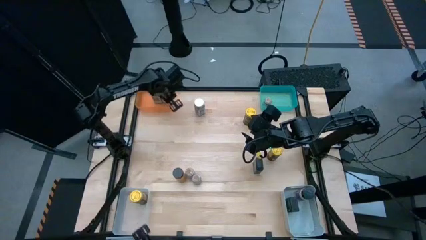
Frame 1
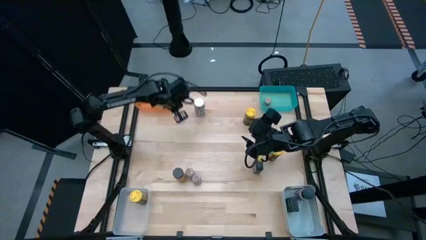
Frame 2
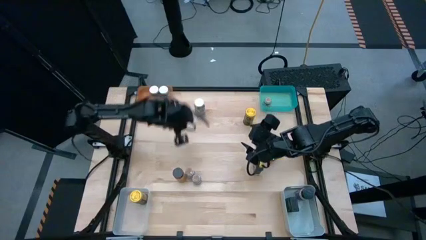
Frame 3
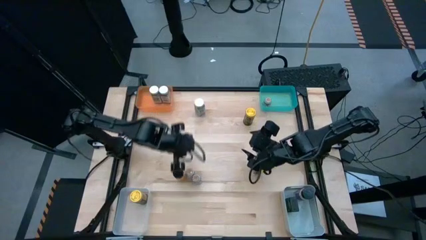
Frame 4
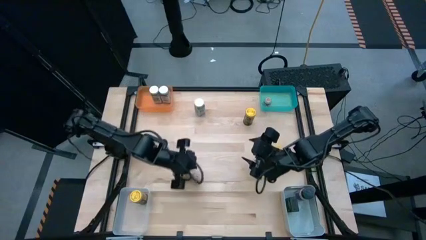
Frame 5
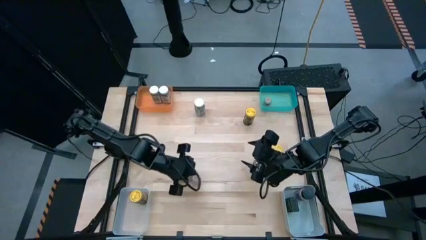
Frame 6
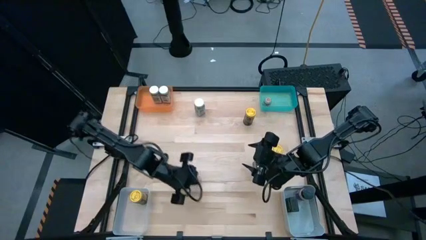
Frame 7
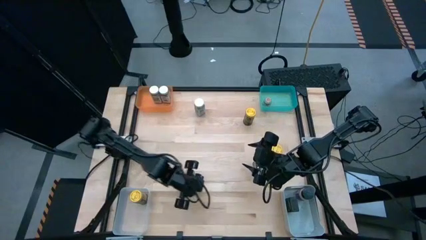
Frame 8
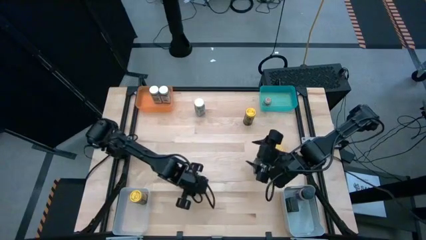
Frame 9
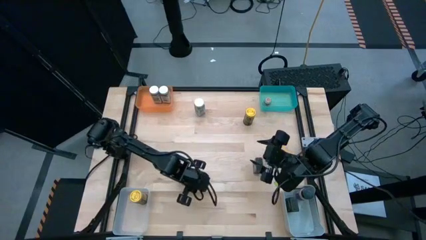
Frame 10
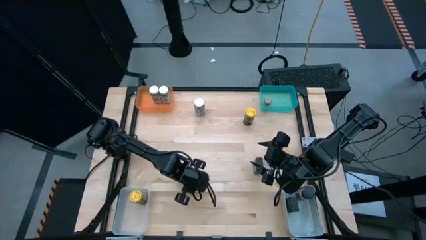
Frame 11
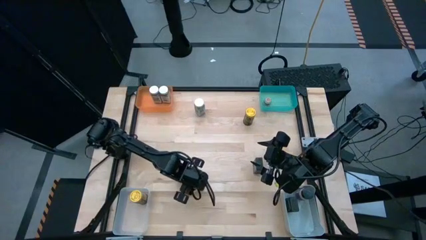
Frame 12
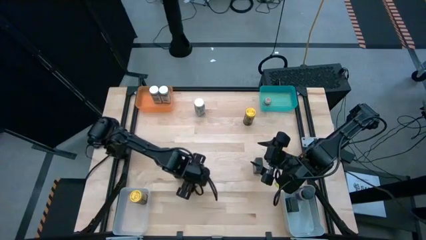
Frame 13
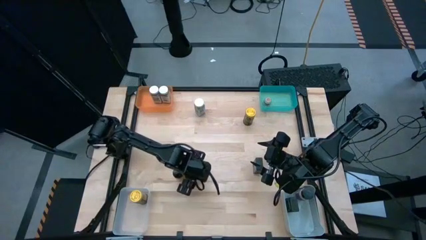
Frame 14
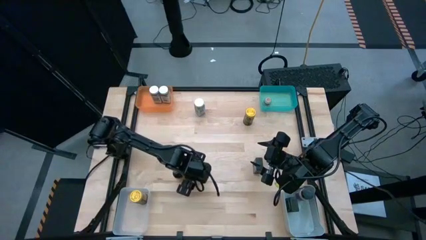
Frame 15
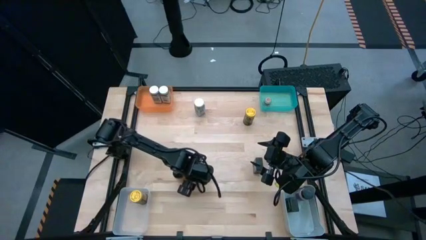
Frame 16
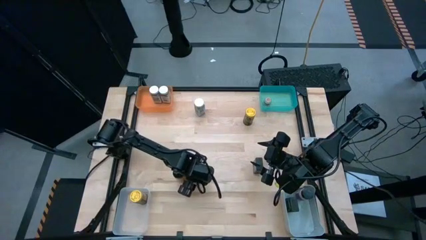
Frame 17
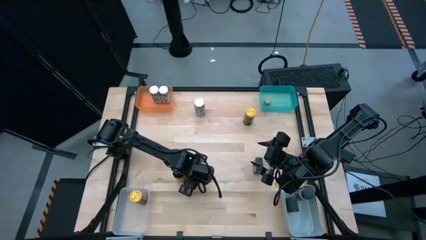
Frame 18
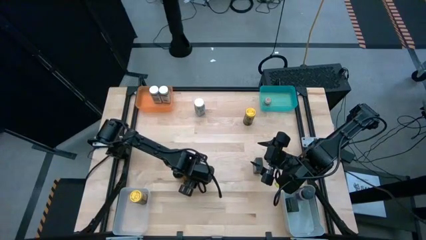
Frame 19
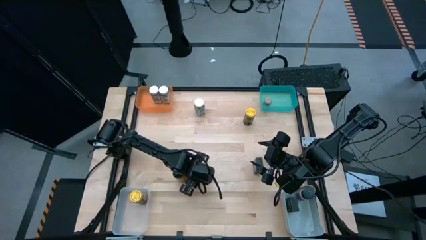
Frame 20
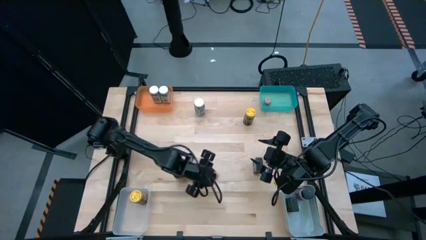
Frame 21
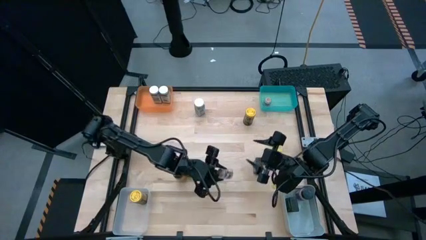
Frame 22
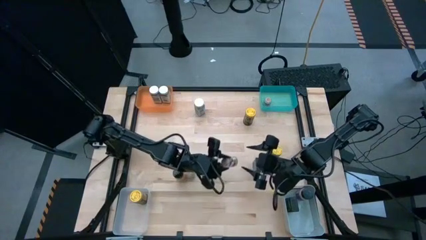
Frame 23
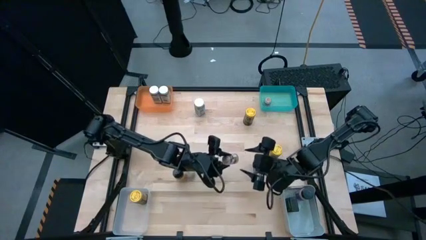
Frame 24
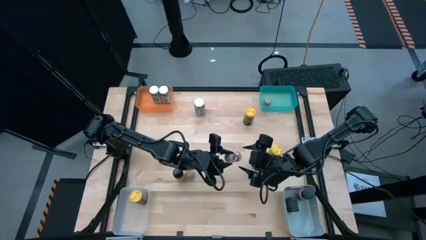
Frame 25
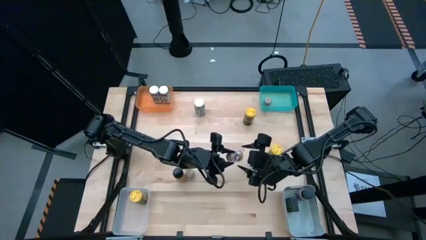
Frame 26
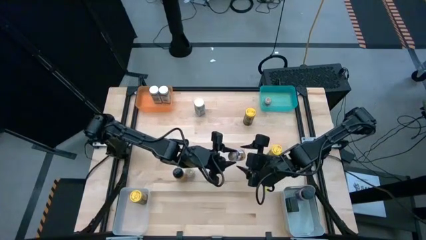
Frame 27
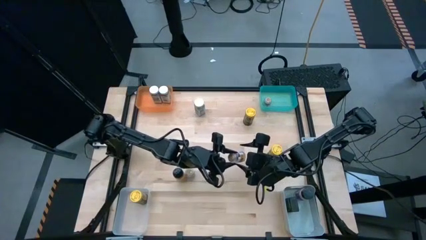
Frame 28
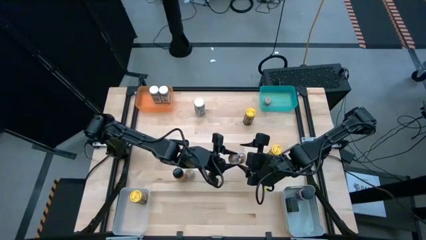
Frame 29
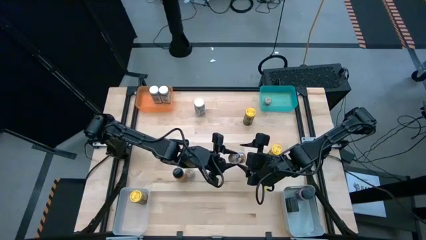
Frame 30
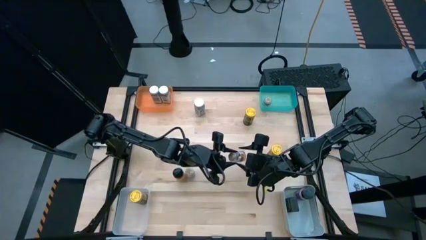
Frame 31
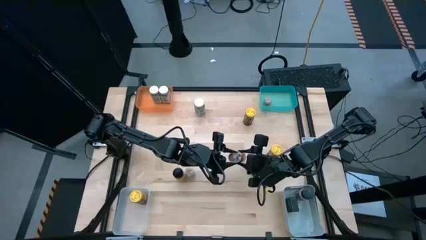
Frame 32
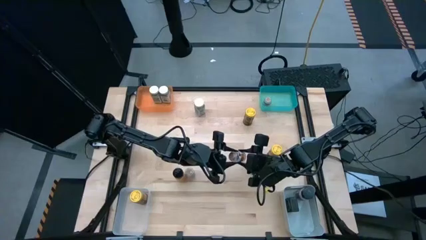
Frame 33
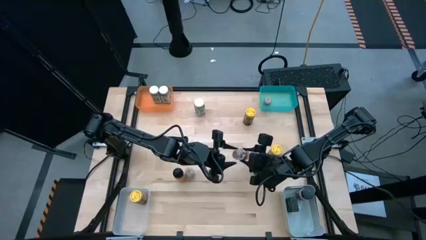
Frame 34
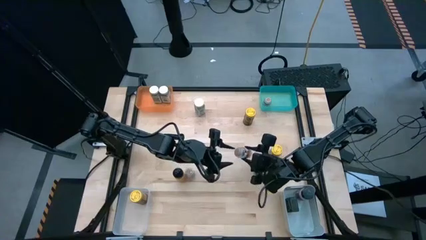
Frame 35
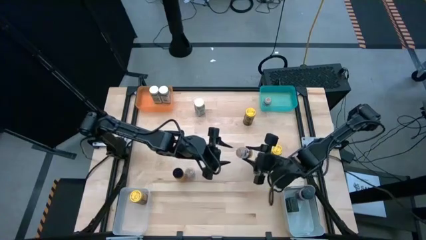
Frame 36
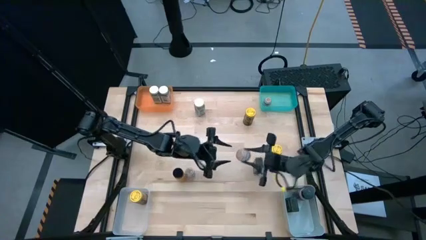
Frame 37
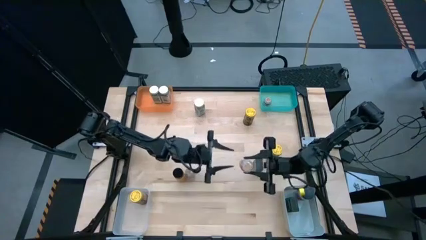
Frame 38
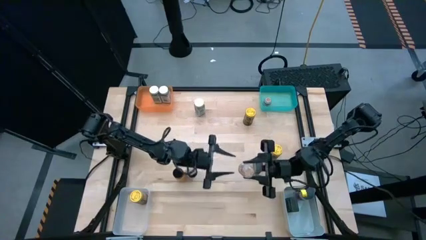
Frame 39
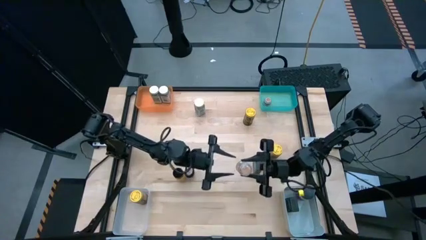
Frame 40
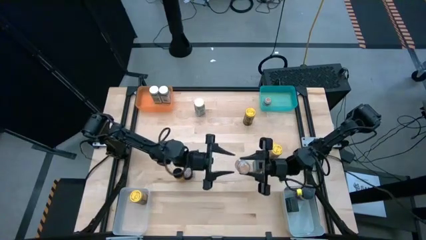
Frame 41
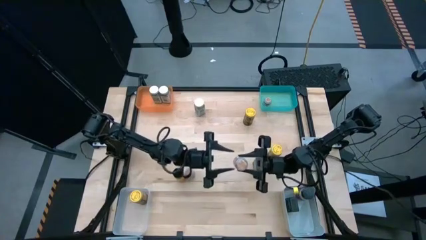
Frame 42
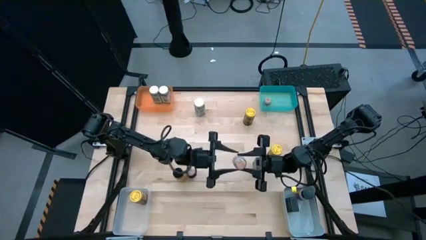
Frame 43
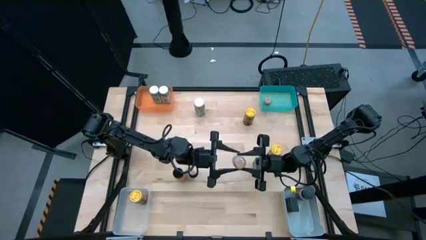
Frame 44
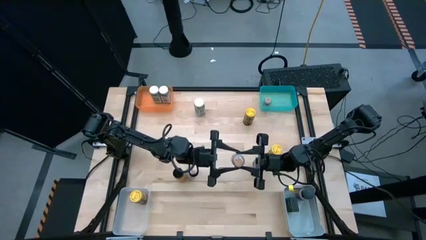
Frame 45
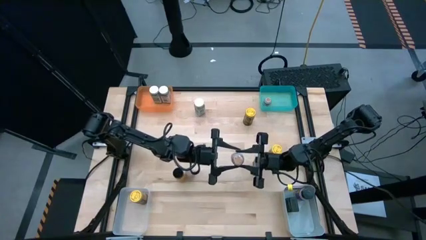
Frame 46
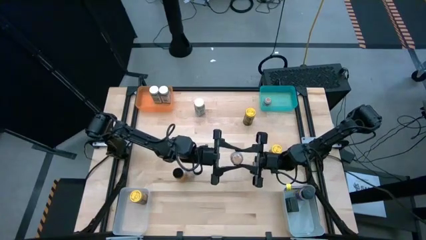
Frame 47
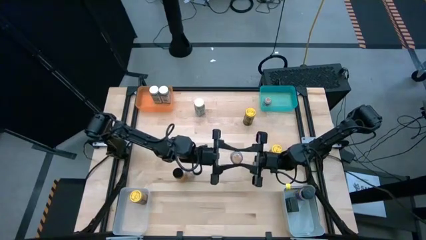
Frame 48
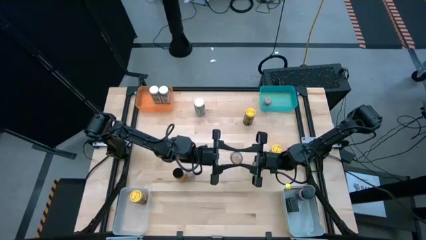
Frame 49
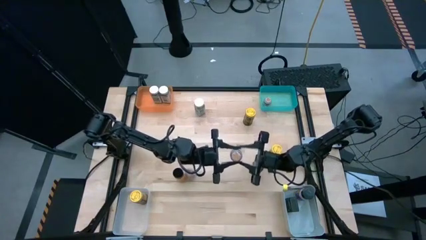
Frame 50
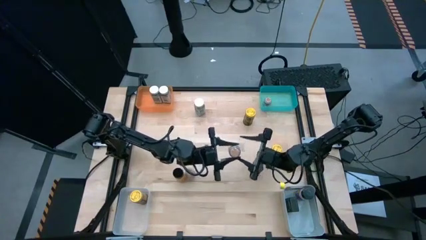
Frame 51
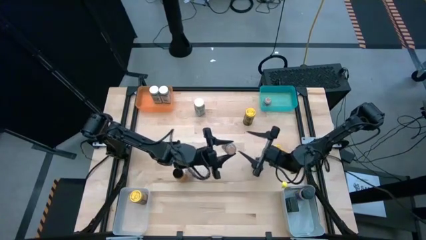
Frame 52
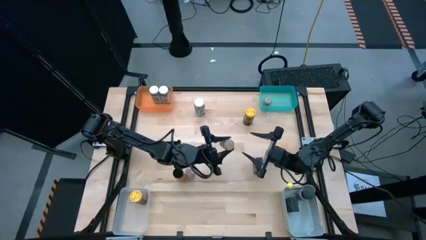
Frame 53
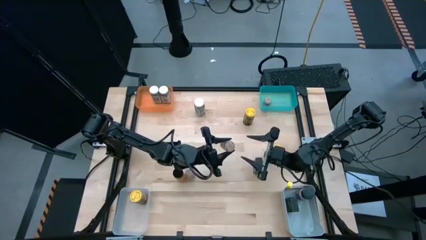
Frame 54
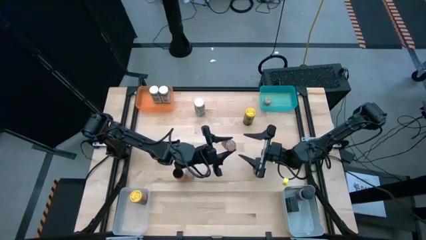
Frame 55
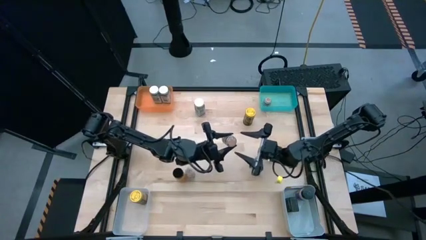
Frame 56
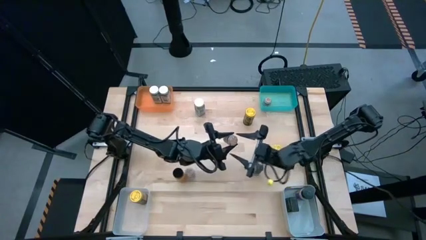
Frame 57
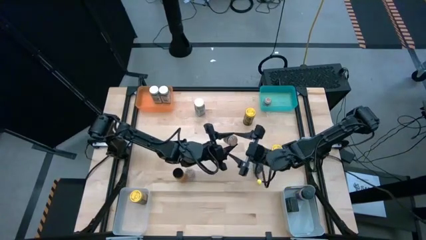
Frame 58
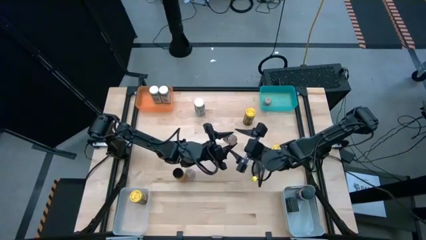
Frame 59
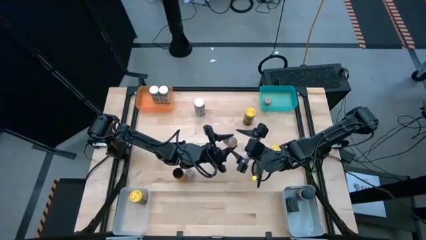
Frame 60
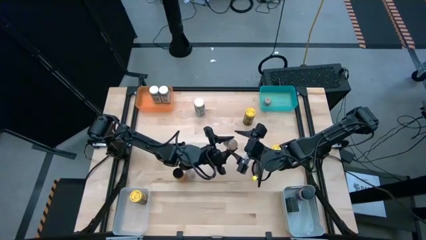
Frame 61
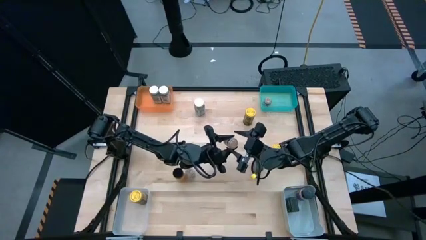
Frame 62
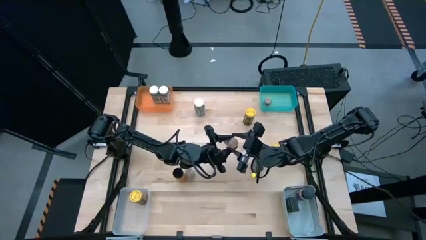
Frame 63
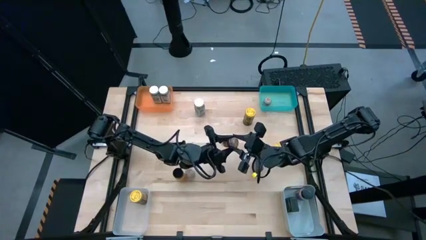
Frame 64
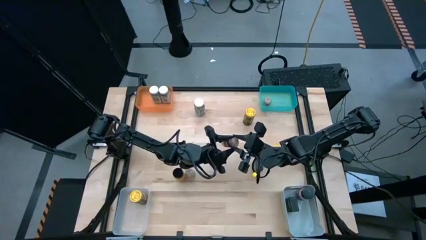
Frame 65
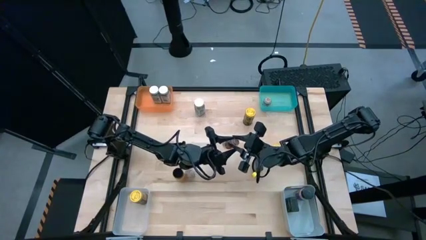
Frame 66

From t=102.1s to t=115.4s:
Task: Sort spices by type
Put the right brown seasoning bottle into the blue bin

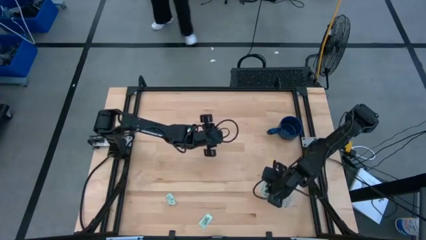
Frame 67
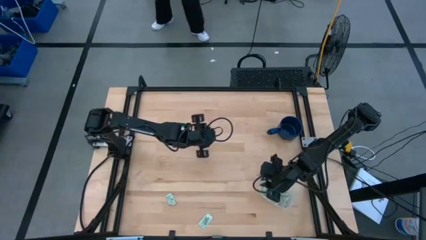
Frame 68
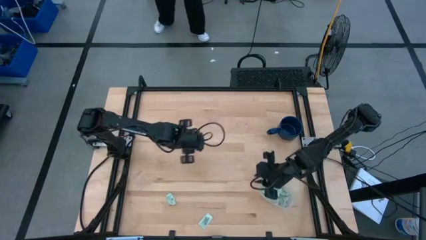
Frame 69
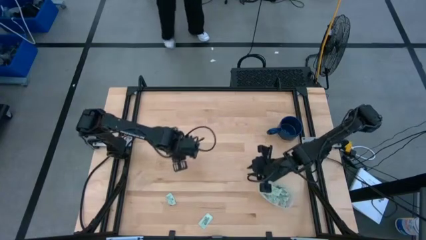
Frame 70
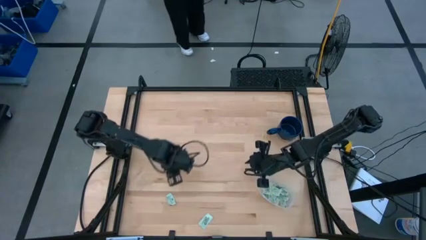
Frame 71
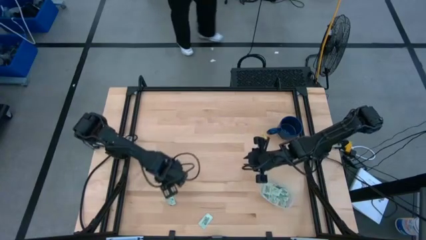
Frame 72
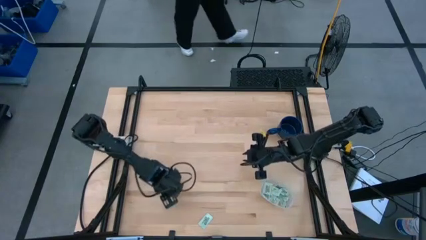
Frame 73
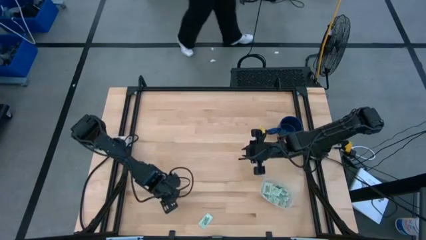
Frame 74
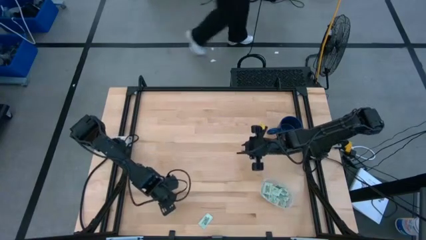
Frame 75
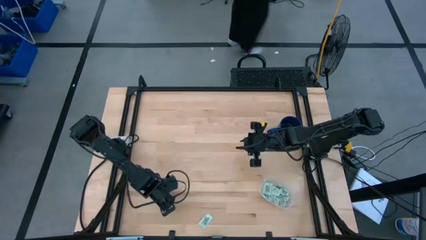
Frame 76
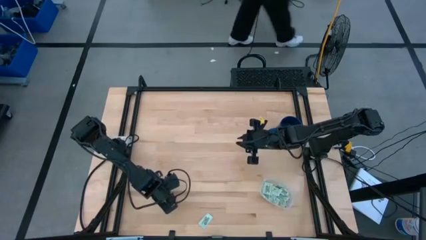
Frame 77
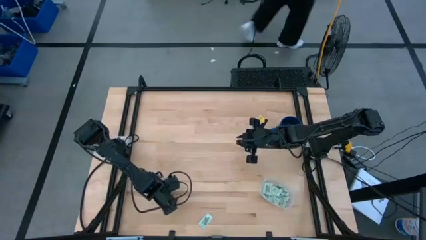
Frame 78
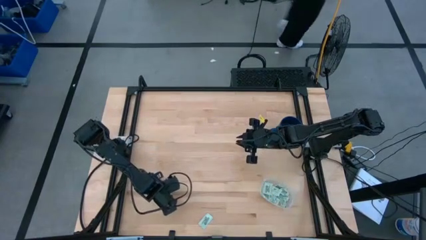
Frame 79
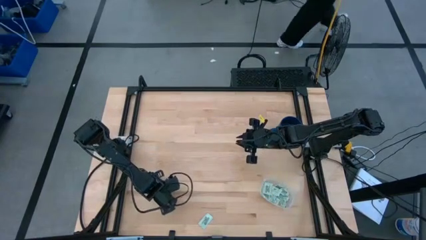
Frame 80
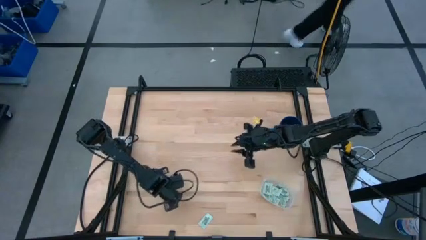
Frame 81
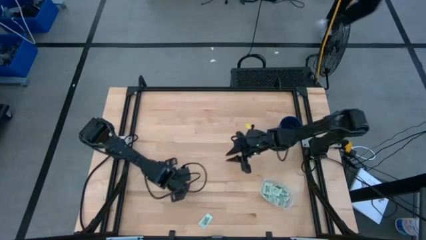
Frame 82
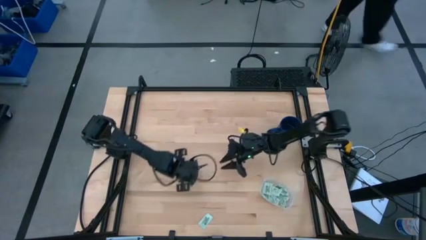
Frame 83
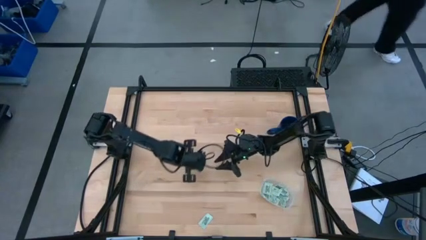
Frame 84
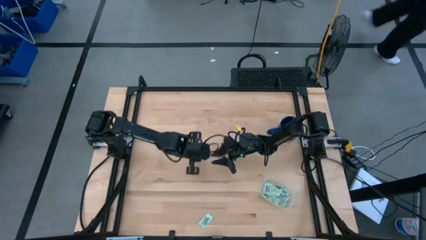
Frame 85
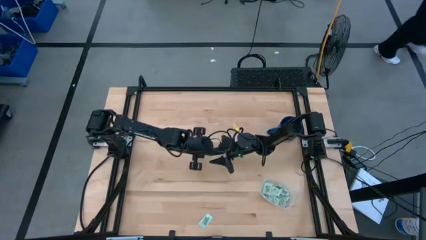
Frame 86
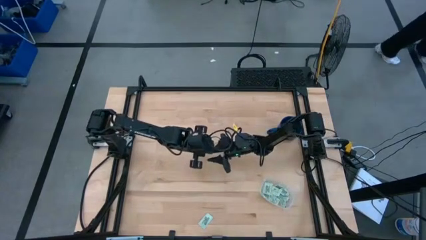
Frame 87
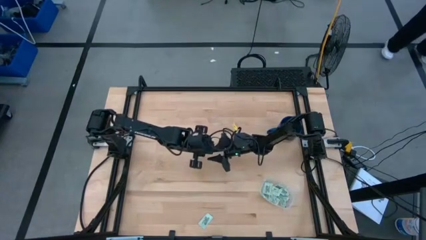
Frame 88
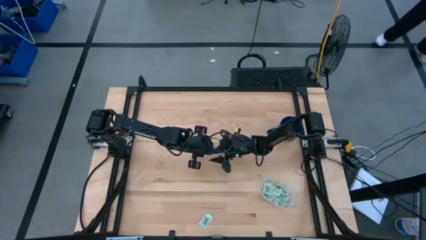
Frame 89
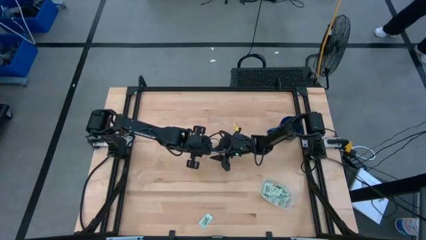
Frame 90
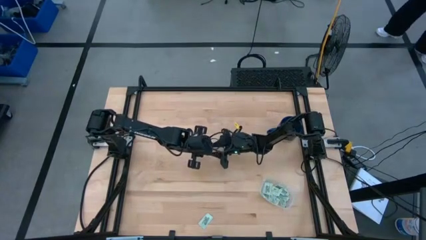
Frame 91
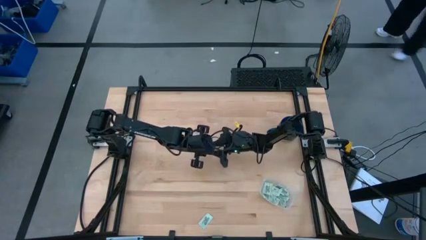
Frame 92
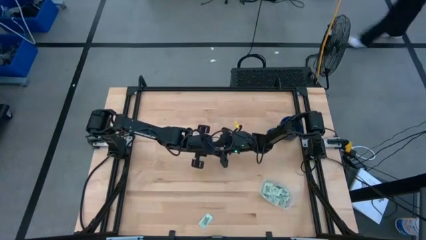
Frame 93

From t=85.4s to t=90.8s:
Task: Pick and place Stevia / Truvia into bins
Put the stevia packet into the transparent container
